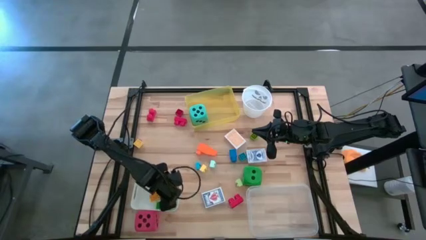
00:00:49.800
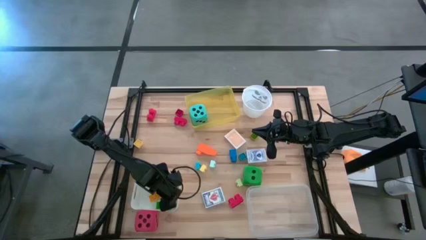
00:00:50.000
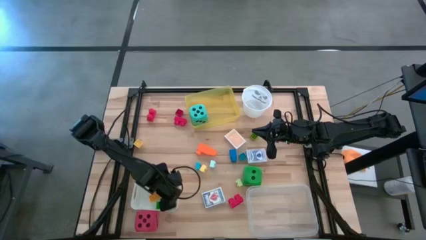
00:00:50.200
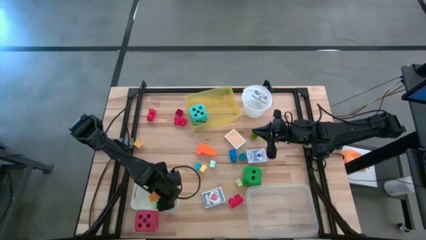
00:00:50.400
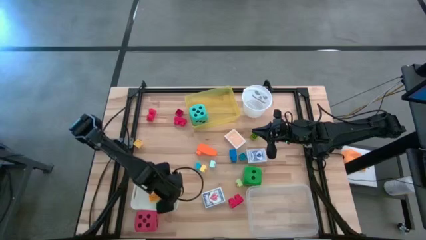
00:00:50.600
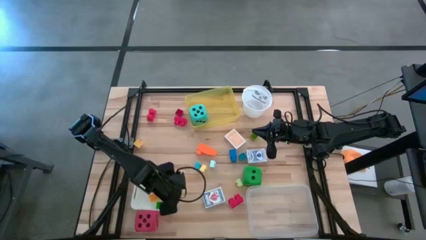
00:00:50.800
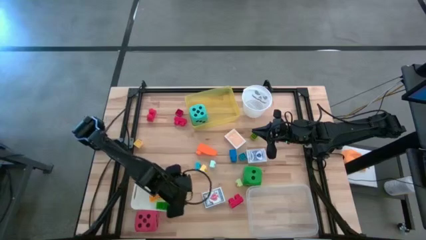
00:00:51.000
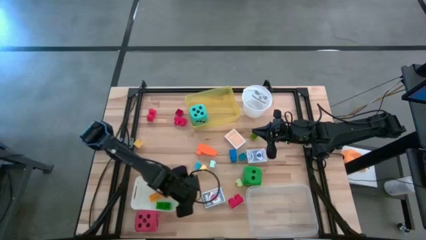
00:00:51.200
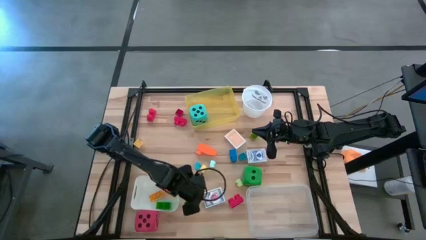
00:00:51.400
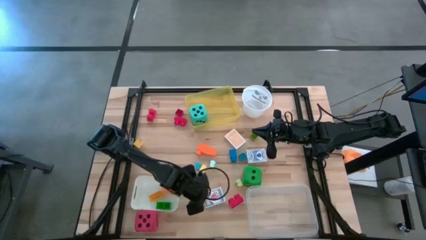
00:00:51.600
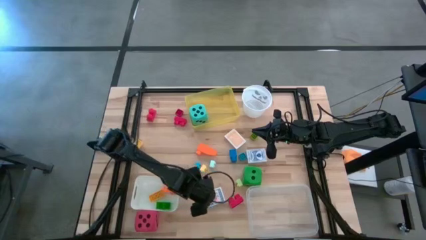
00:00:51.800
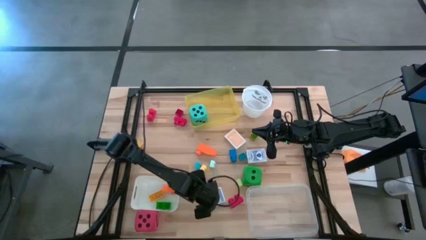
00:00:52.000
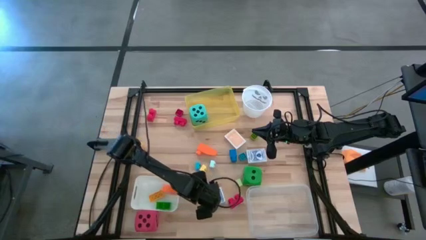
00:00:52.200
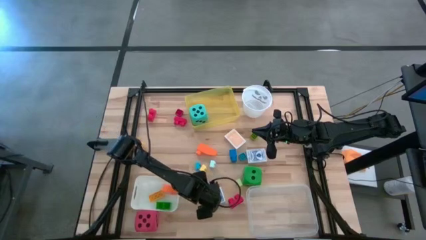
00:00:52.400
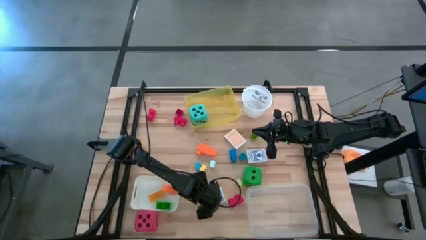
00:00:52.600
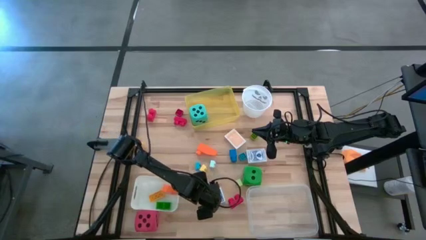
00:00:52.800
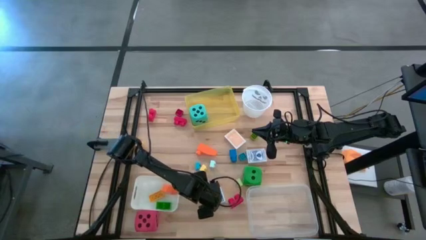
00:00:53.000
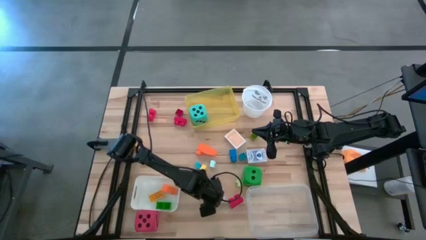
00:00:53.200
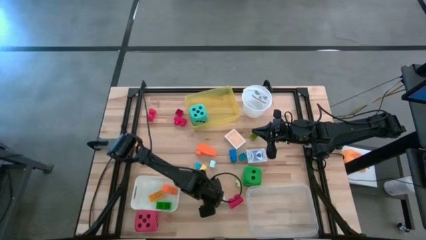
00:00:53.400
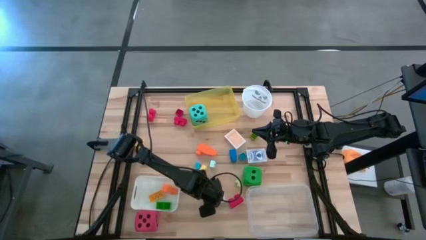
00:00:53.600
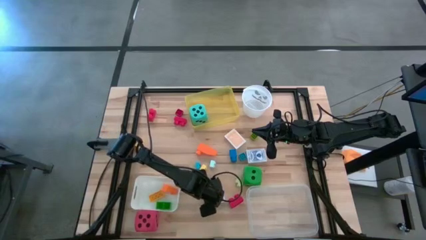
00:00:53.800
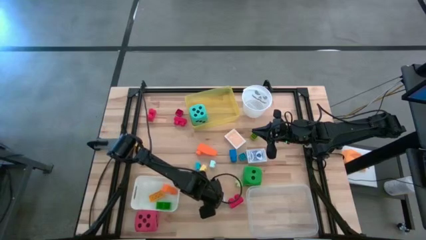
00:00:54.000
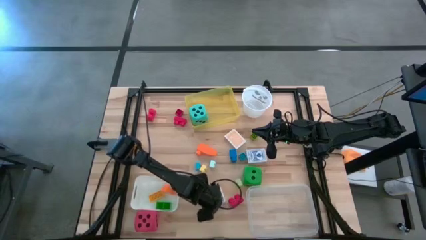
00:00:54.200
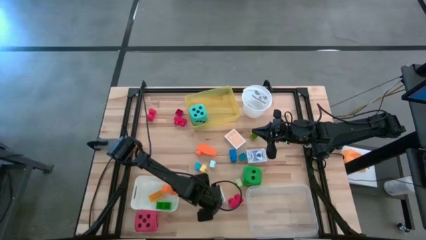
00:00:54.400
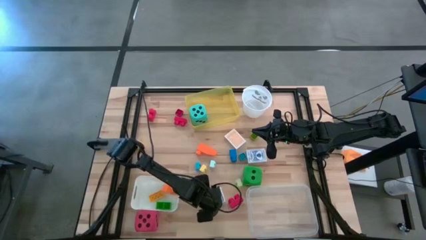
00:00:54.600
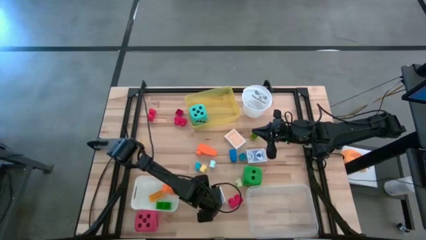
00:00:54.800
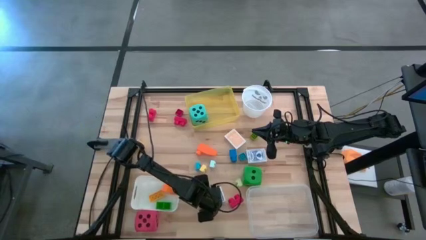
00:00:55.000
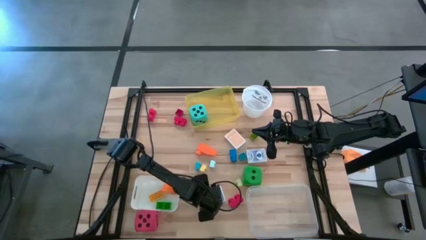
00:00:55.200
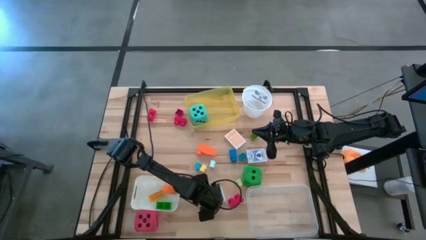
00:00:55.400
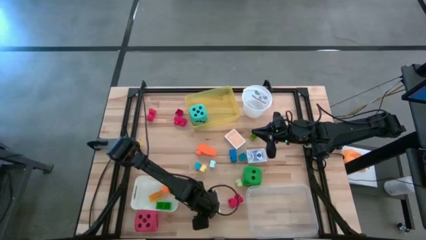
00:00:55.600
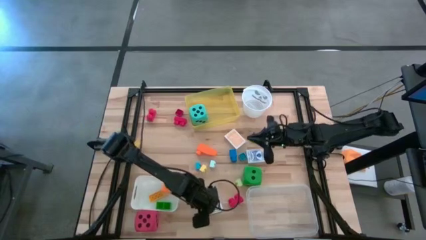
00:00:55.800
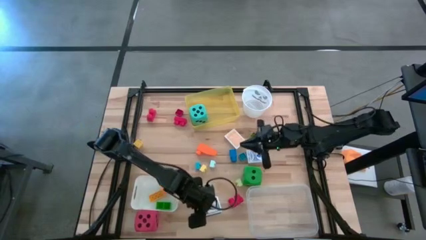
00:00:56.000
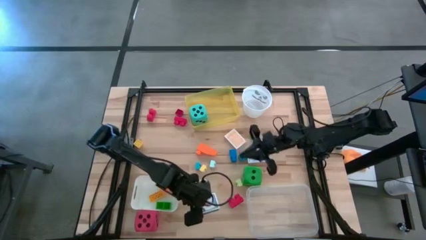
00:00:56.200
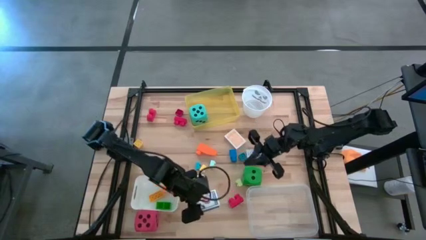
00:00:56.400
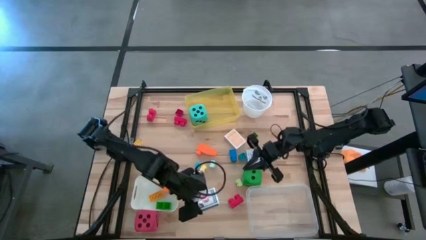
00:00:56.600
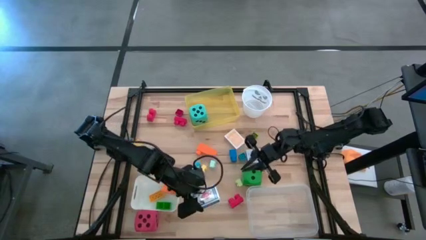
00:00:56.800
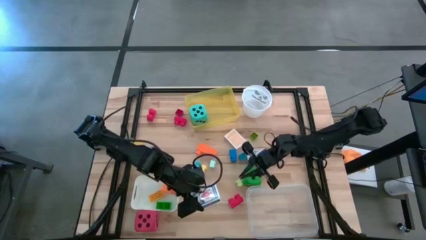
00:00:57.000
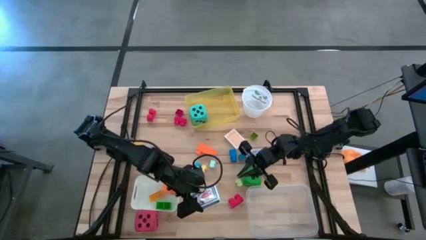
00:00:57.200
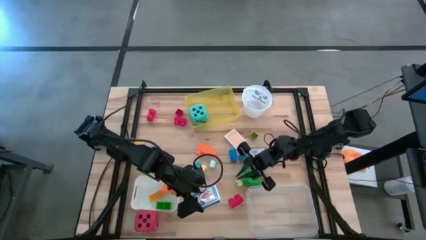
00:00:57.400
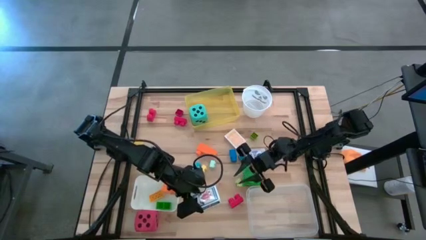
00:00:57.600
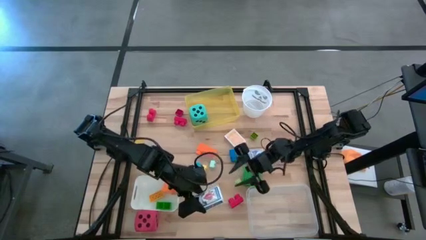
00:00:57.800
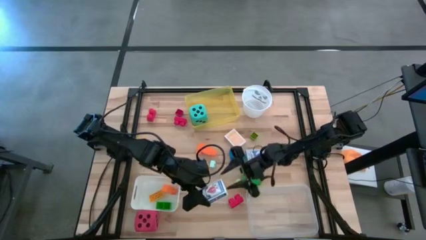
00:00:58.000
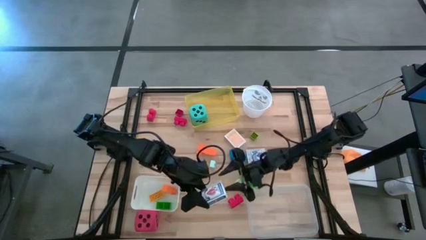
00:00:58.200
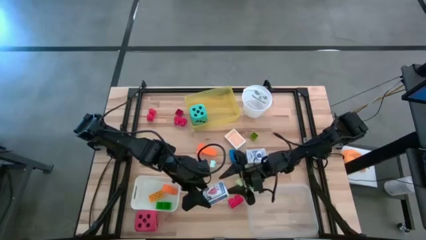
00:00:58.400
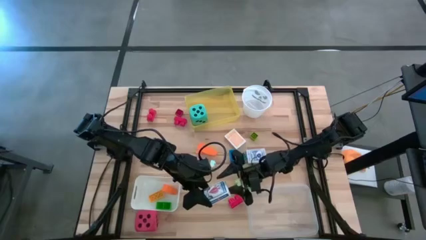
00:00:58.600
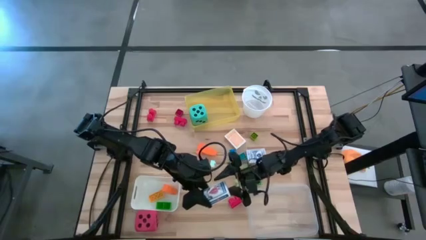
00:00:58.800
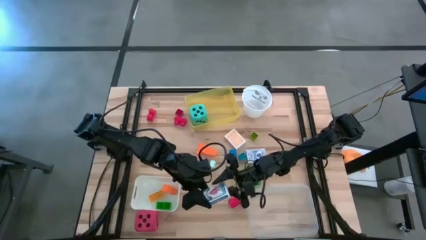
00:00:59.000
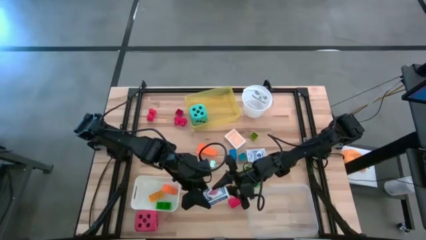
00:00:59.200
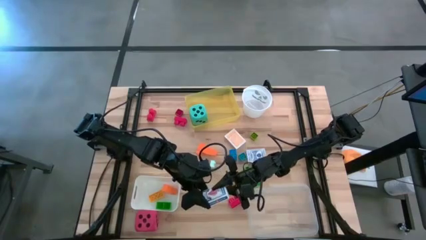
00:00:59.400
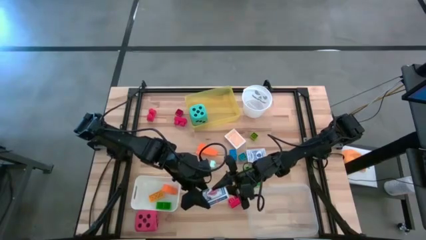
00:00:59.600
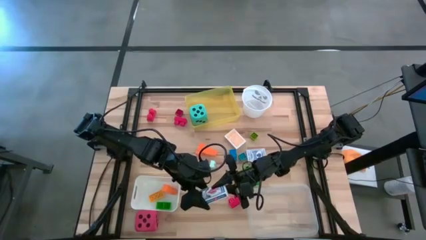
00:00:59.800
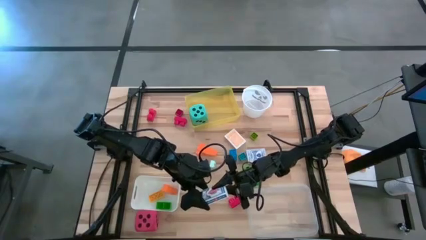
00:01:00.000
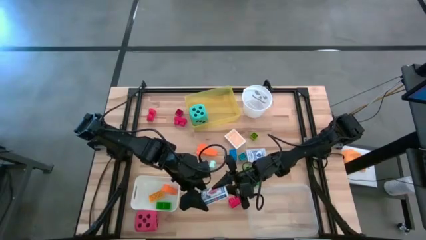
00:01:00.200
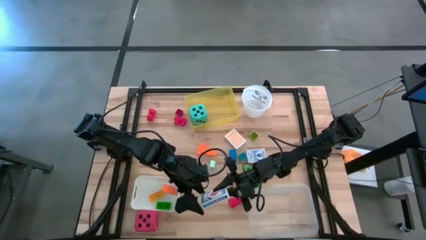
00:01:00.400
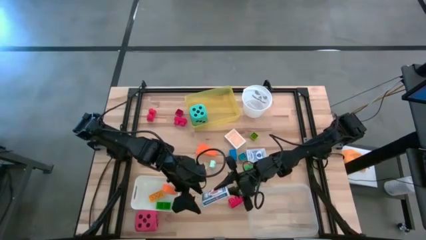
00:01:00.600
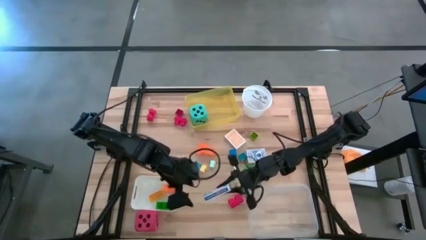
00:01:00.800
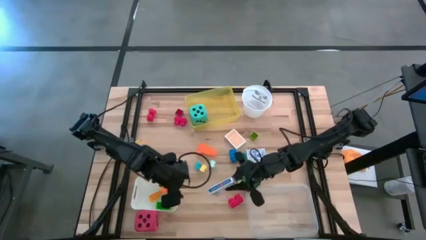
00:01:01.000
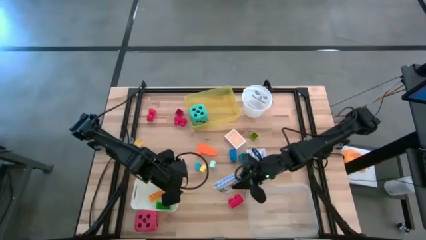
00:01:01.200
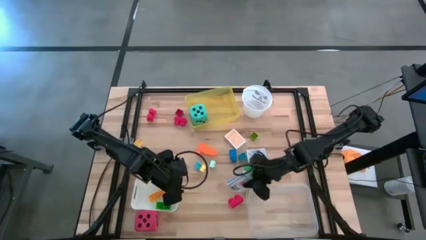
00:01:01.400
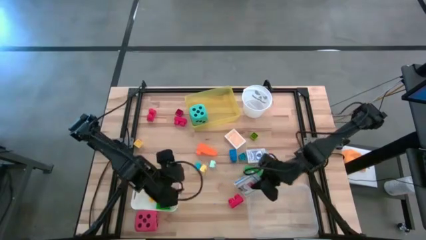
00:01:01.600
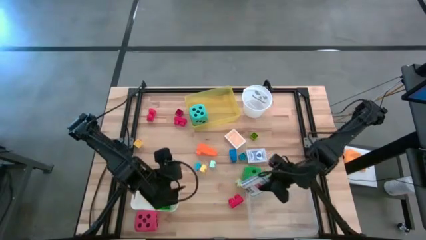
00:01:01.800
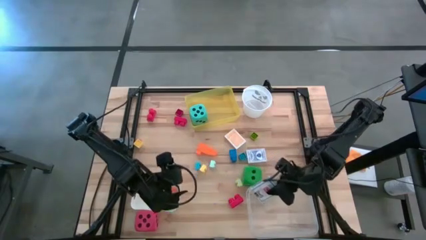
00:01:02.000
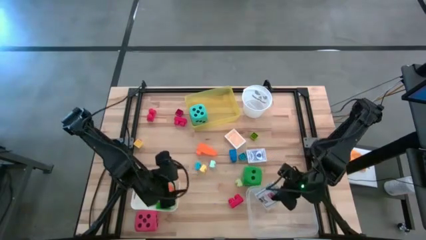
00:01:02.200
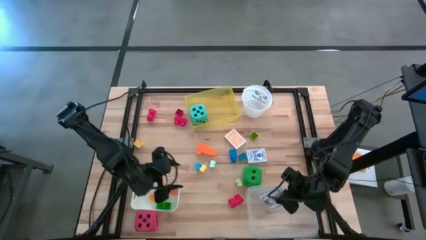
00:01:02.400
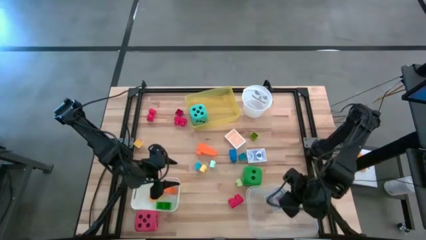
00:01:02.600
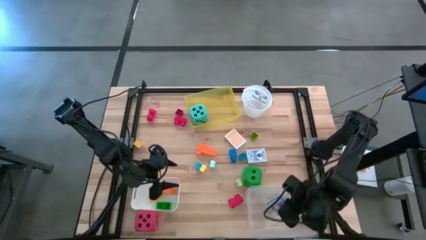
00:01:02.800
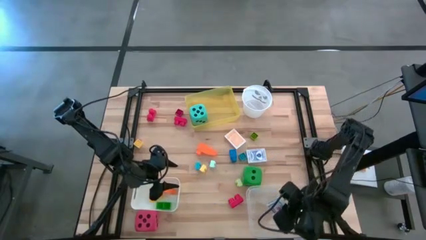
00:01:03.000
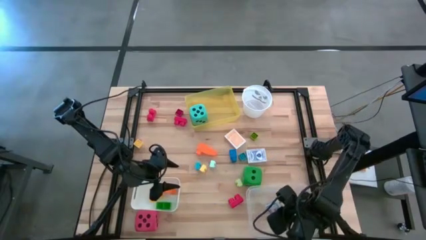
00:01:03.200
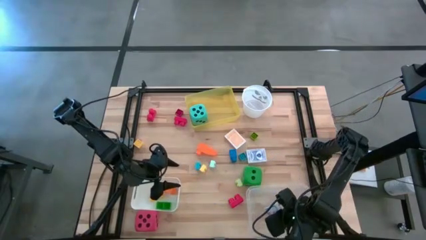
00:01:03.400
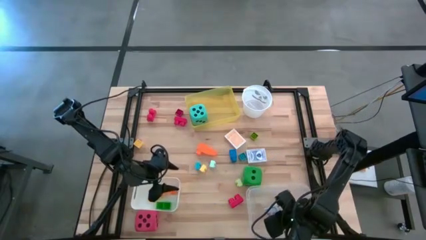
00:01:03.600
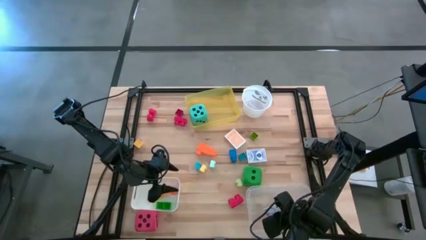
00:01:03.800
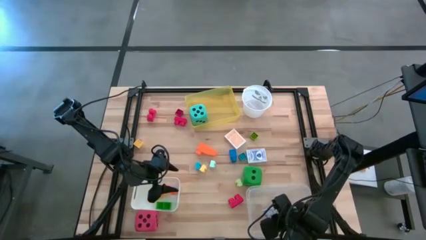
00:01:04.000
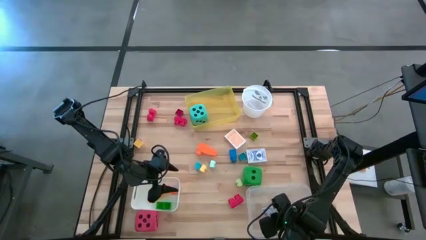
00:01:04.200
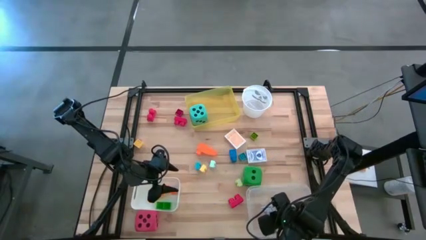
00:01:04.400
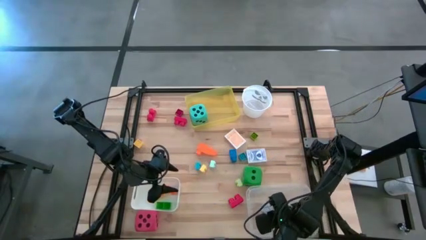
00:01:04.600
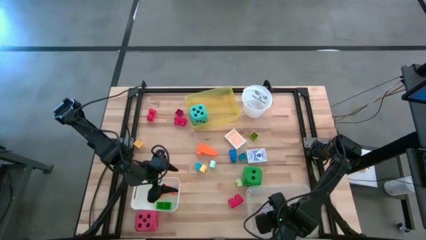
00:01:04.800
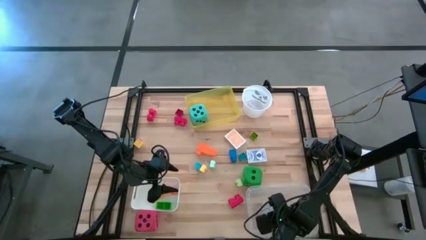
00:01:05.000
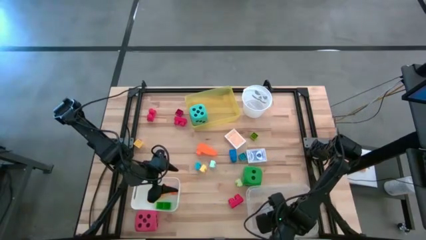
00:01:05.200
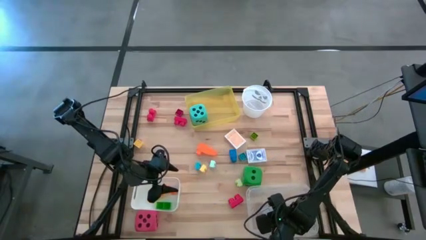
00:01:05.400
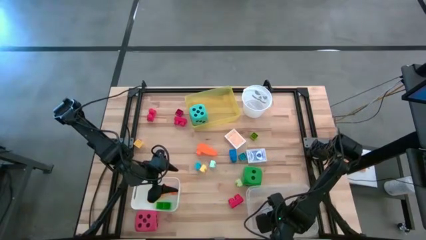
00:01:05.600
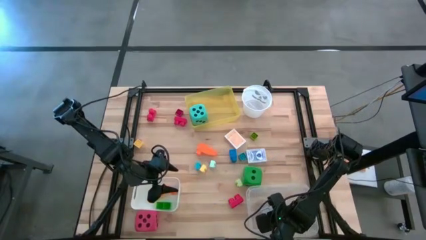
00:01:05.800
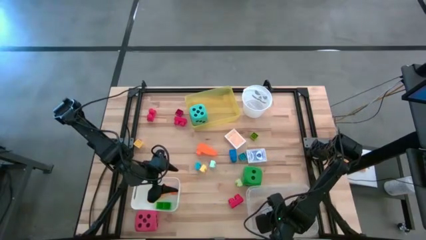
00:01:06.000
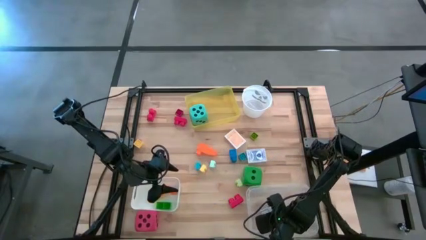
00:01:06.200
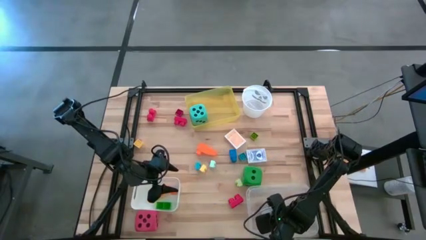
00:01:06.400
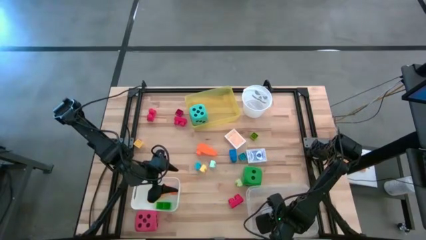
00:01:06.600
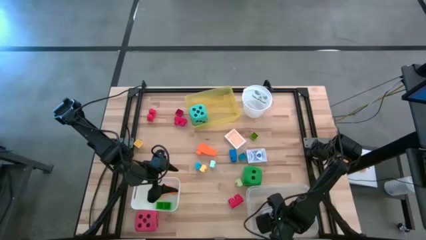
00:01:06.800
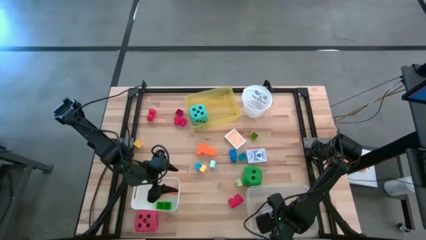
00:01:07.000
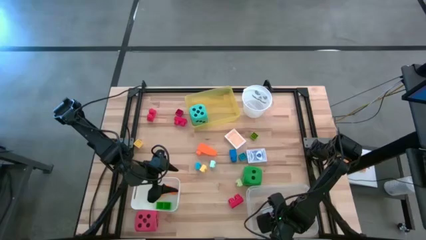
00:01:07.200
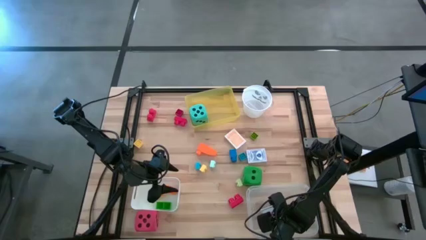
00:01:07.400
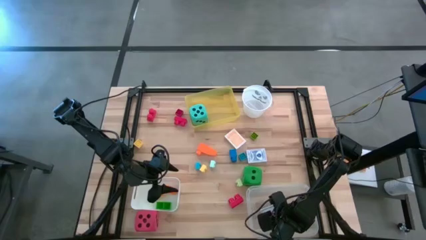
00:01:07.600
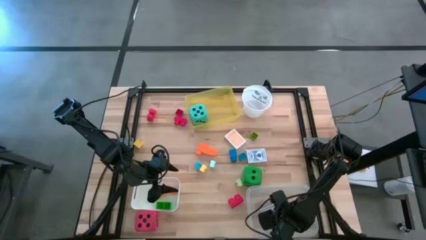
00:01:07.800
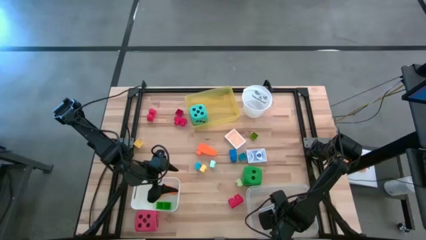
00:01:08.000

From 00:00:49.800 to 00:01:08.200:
Task: Pick & Place Toys
Put the white and blue deck of cards into the transparent bin
